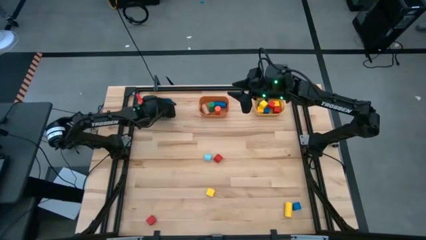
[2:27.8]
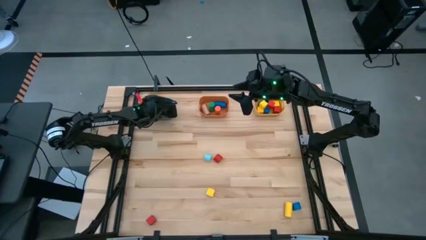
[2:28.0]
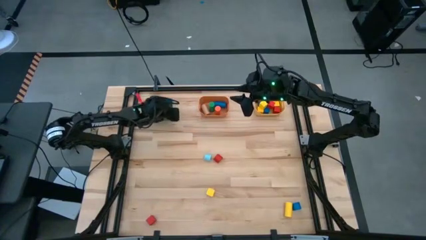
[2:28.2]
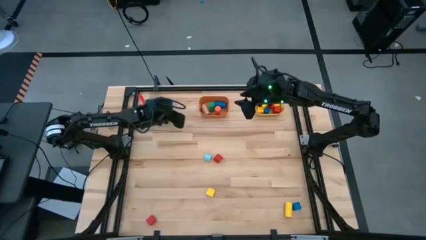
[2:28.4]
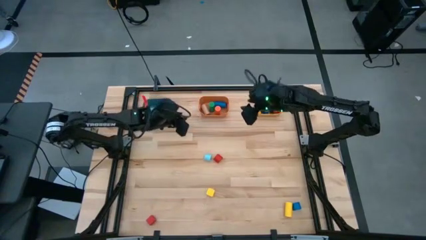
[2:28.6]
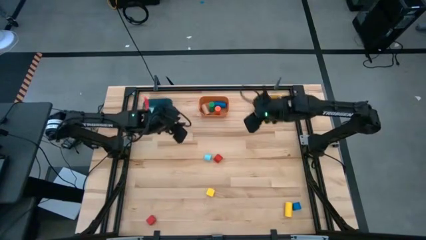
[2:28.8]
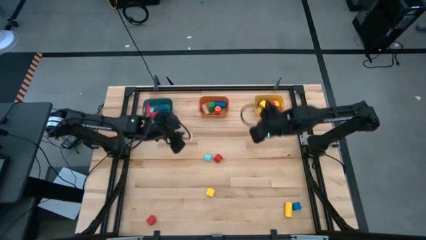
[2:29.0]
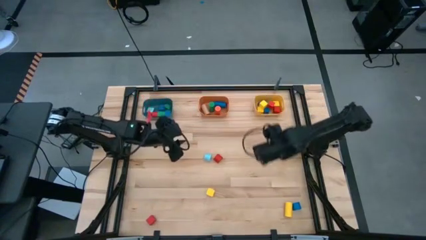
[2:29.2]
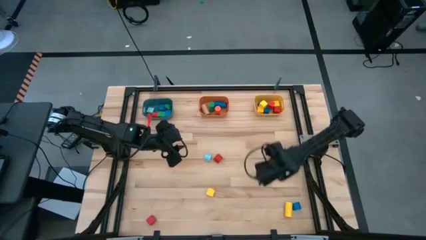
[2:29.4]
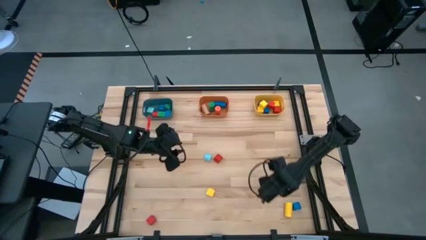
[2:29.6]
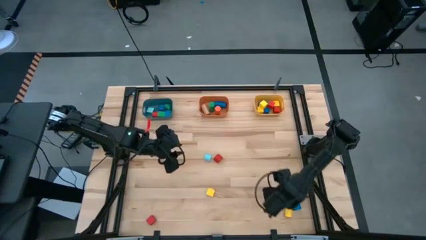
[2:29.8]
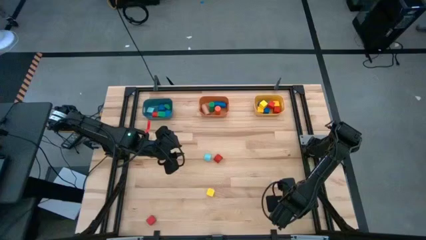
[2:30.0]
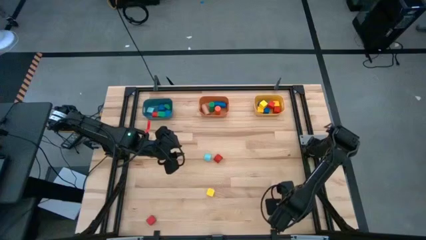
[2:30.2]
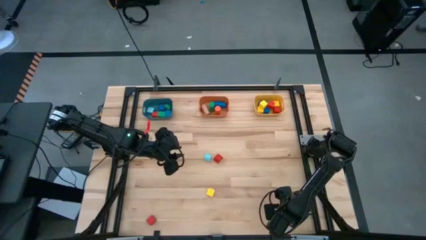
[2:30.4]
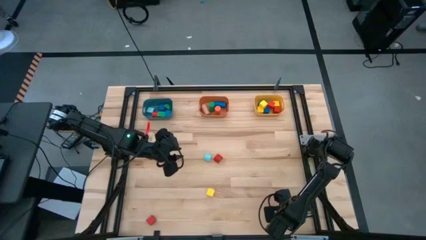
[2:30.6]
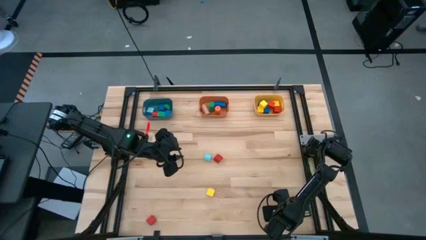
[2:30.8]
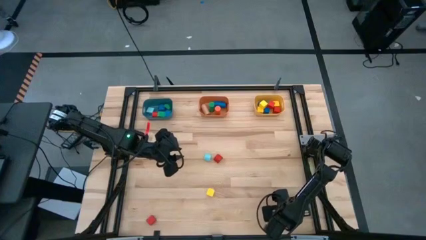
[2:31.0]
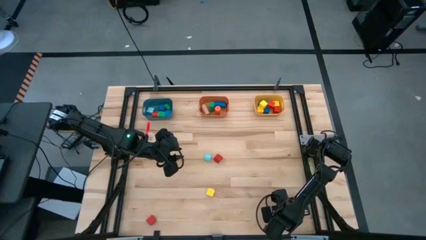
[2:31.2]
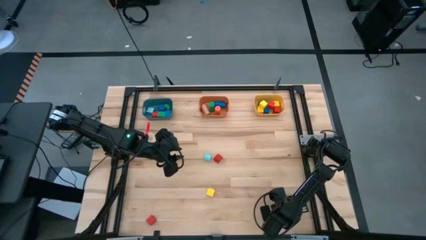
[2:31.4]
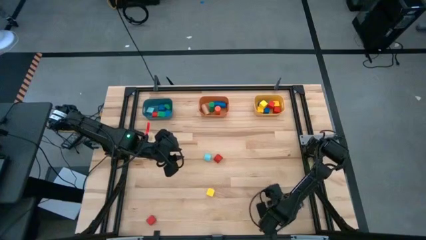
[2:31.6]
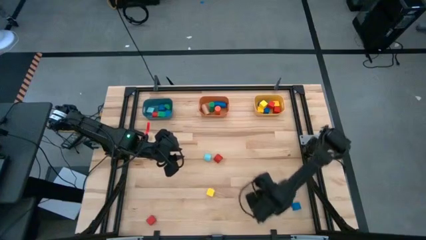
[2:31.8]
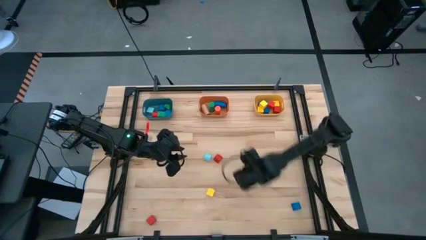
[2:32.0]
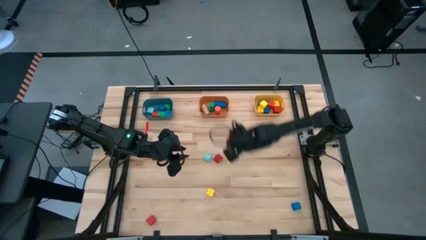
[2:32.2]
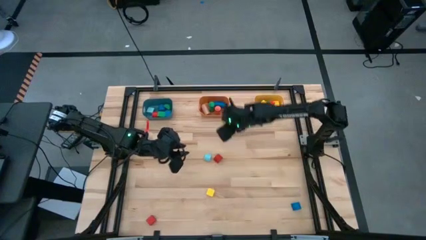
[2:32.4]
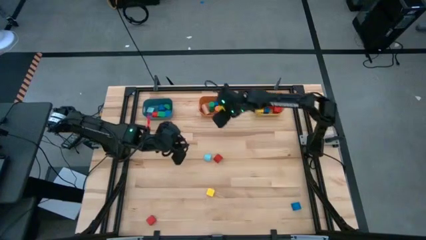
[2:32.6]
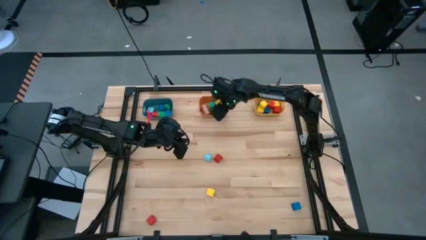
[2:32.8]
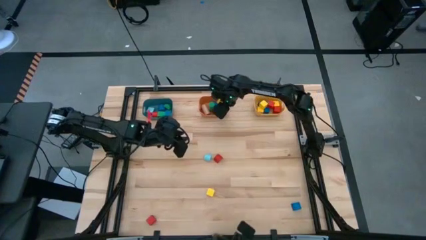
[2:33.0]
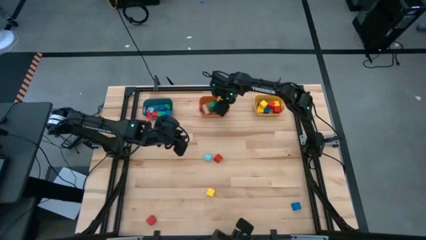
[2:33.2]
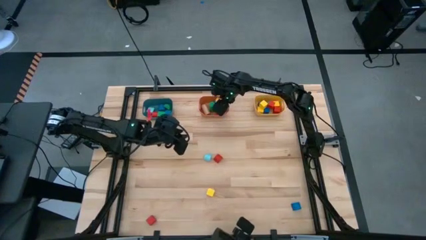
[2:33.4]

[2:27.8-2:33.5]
Task: Sort blocks by size
Put the yellow cylindrical block into the orange bin

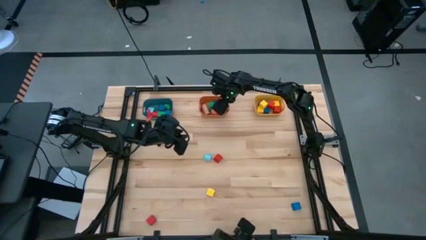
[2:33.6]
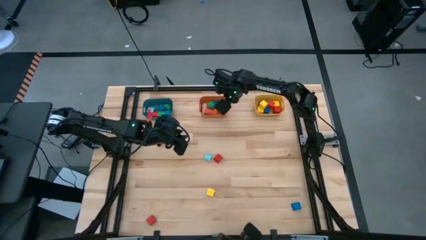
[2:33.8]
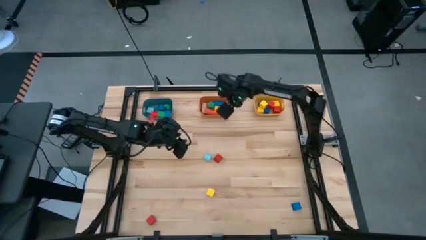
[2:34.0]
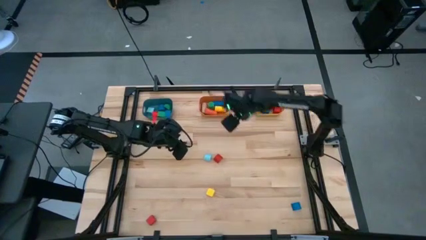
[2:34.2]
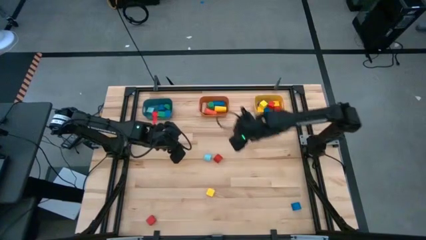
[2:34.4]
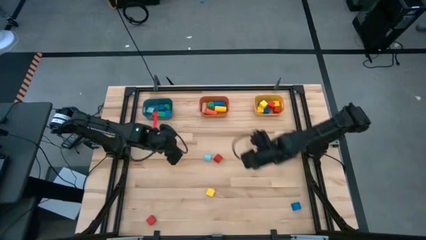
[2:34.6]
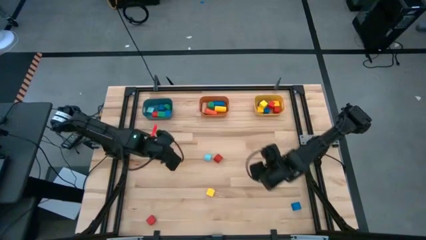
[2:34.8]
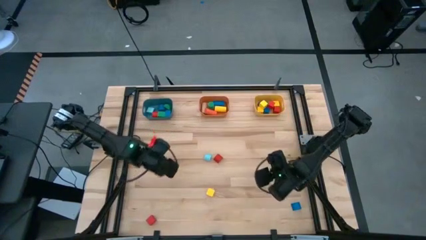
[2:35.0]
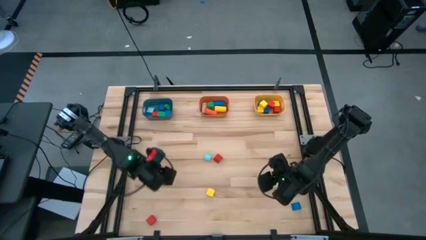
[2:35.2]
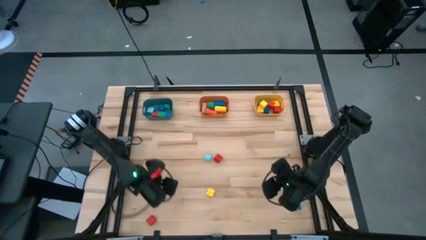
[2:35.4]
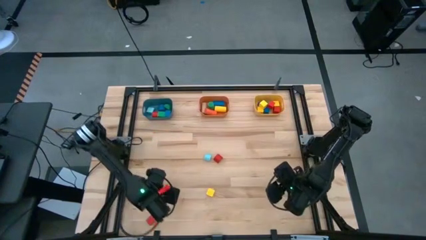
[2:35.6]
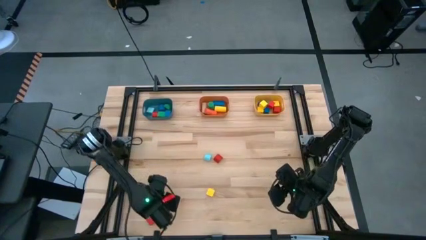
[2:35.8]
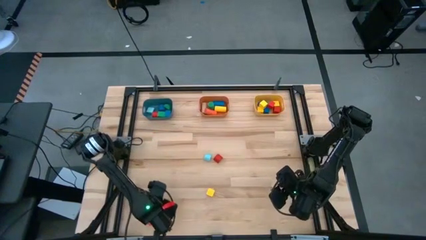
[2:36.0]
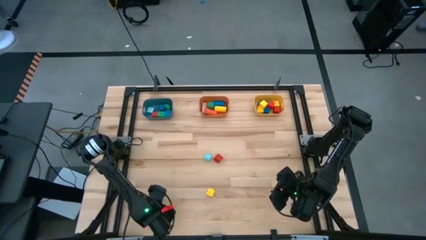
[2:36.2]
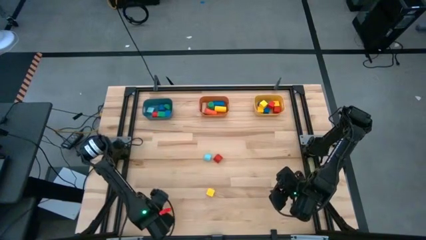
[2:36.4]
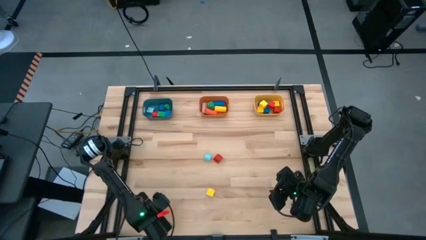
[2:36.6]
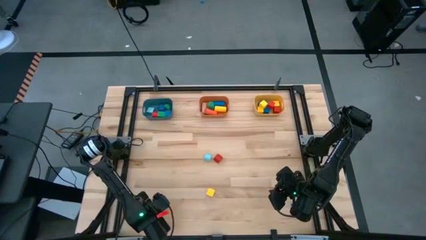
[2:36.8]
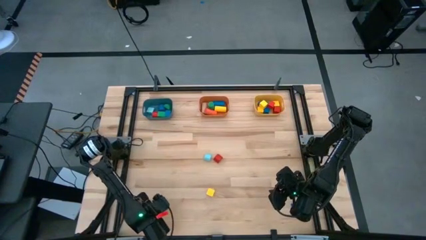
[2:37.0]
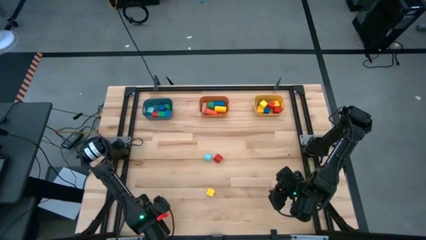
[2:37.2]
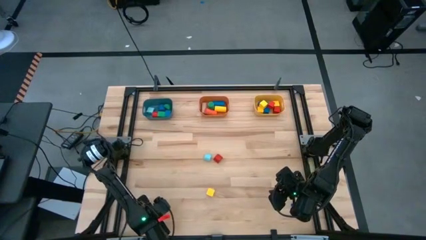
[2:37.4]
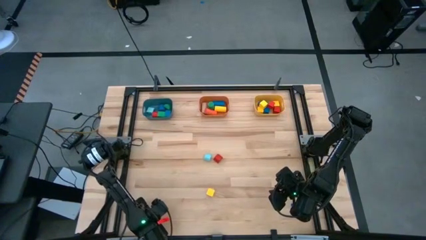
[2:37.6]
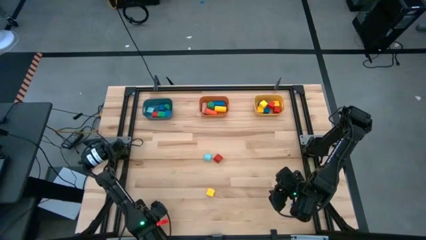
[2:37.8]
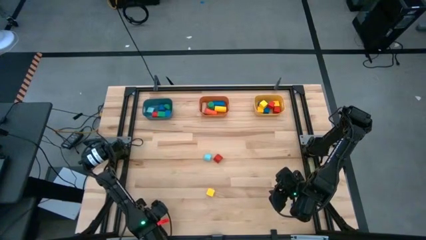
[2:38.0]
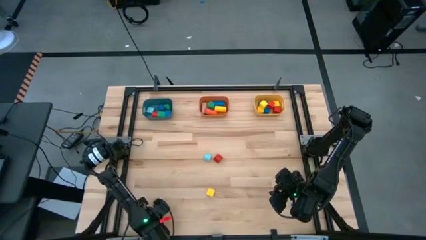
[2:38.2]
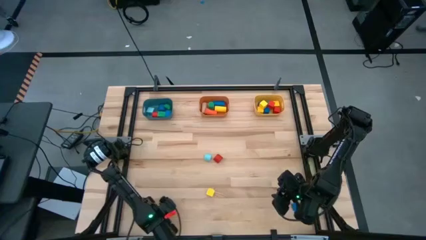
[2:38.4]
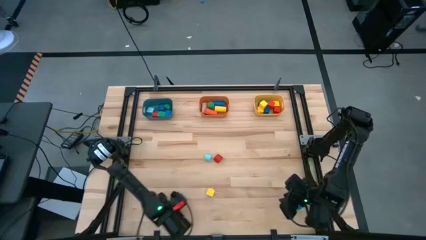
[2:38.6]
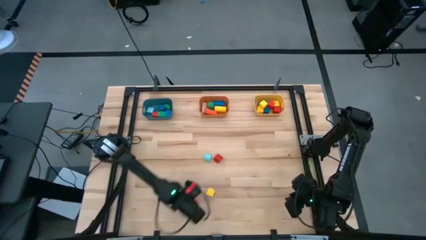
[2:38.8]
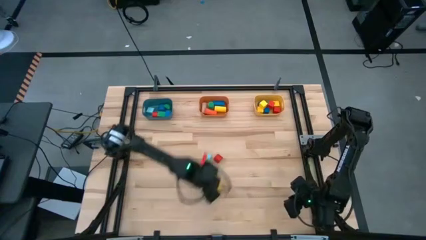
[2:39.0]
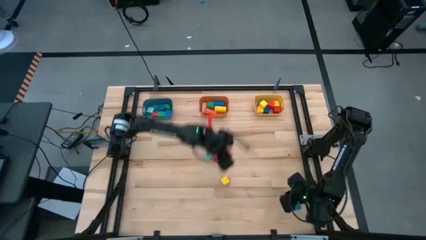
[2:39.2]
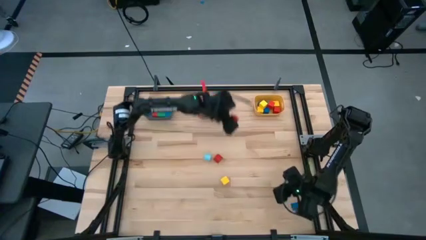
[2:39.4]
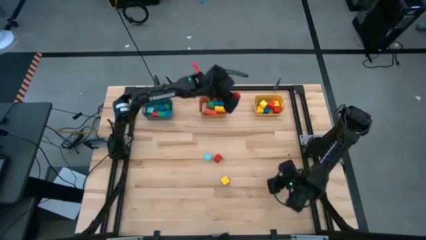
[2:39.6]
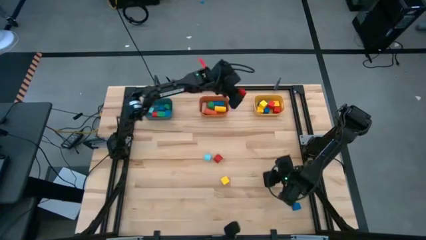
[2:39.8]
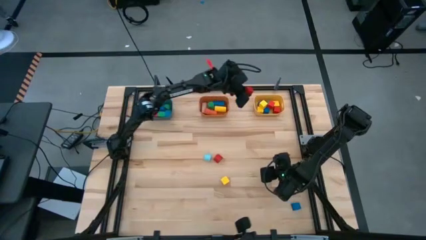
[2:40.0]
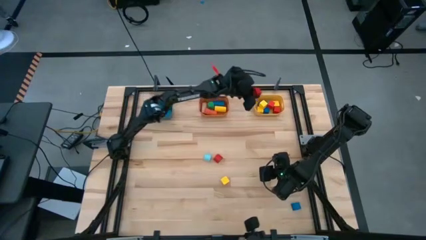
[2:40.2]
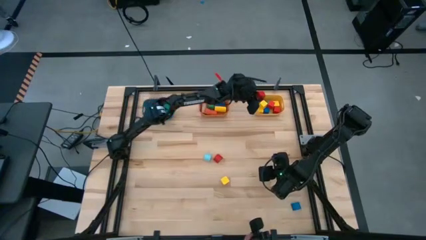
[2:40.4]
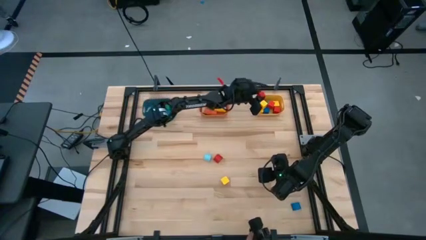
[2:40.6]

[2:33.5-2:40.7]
Put the red cube block into the yellow bin

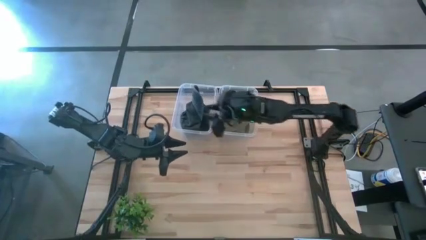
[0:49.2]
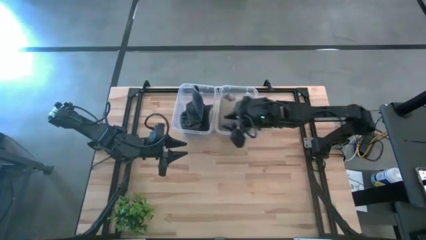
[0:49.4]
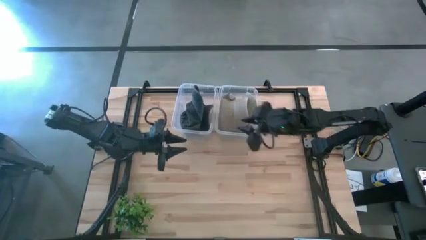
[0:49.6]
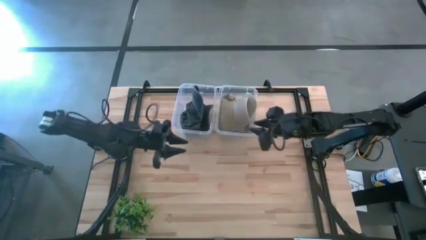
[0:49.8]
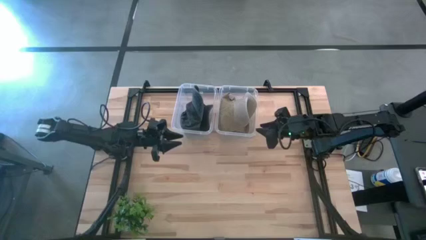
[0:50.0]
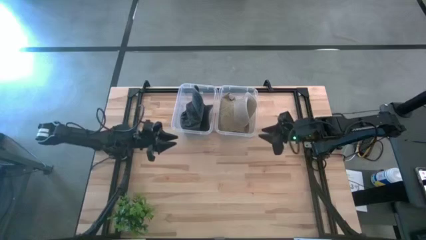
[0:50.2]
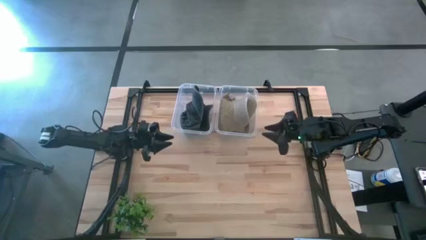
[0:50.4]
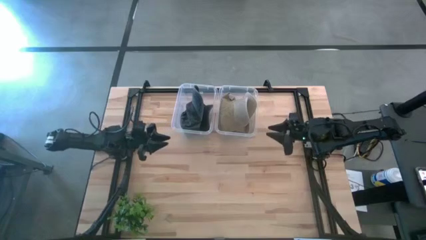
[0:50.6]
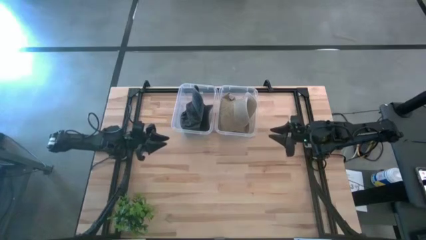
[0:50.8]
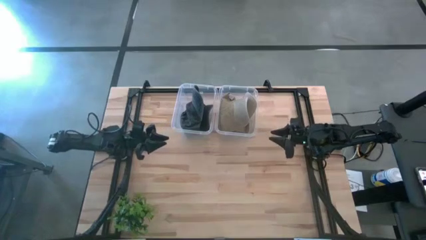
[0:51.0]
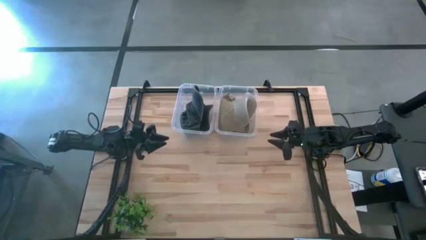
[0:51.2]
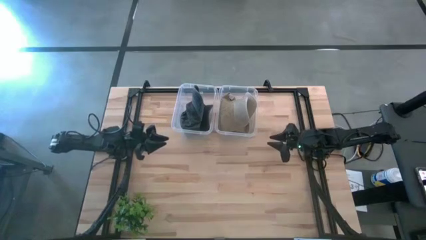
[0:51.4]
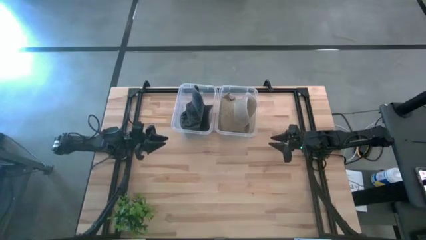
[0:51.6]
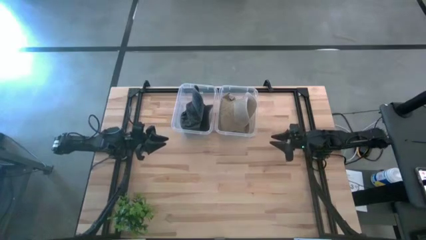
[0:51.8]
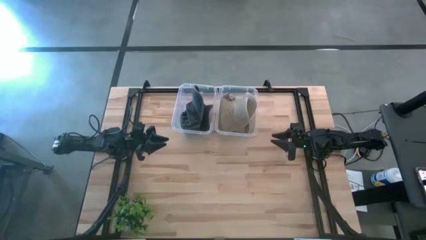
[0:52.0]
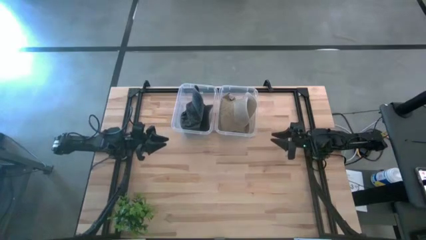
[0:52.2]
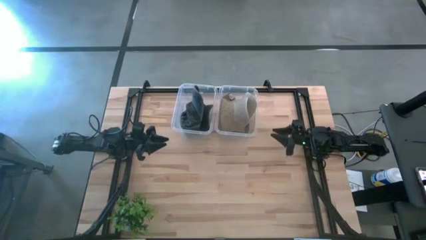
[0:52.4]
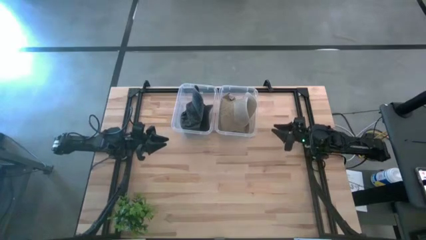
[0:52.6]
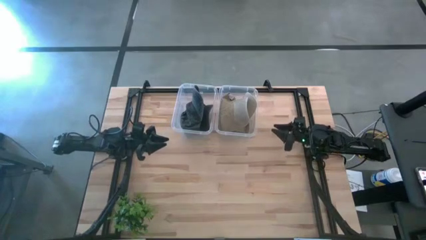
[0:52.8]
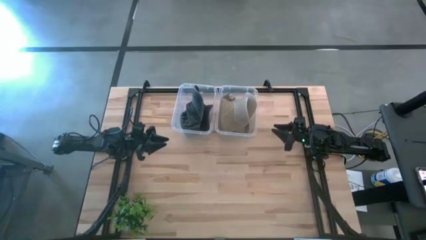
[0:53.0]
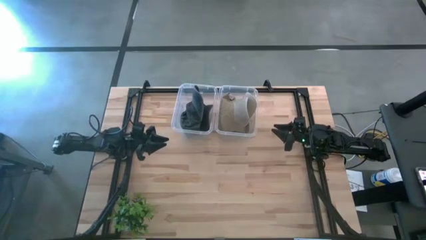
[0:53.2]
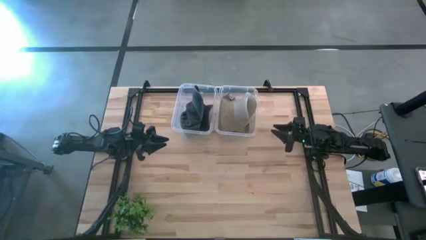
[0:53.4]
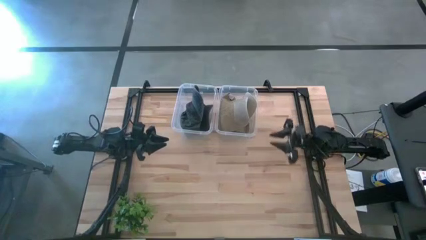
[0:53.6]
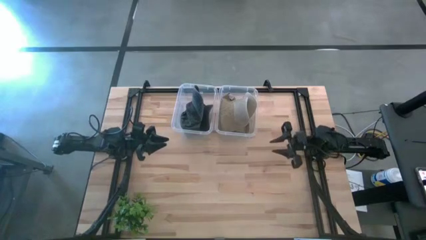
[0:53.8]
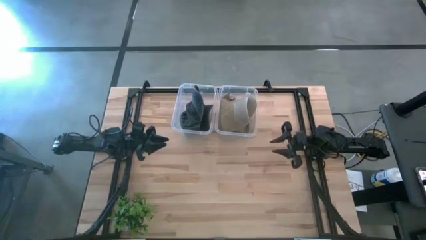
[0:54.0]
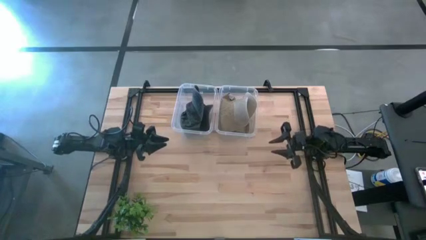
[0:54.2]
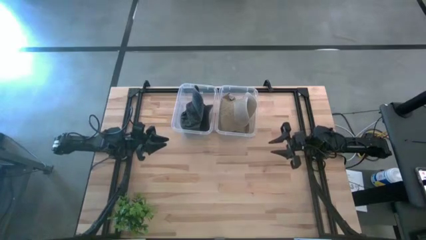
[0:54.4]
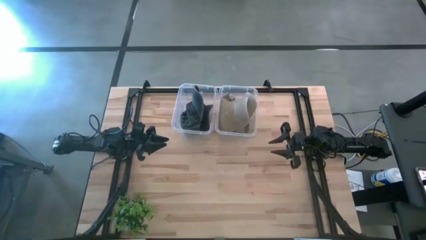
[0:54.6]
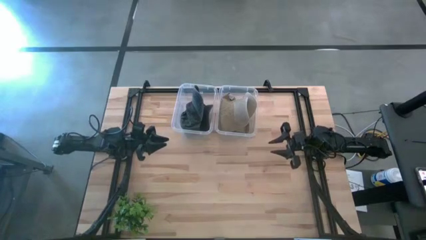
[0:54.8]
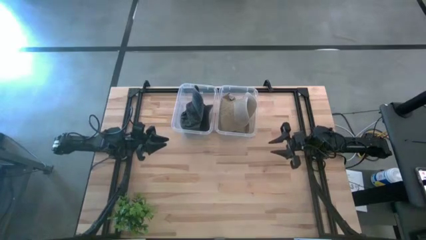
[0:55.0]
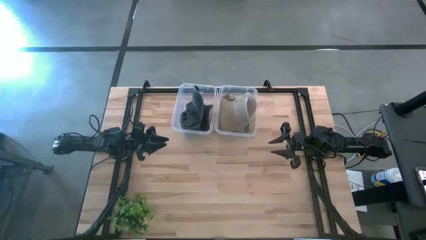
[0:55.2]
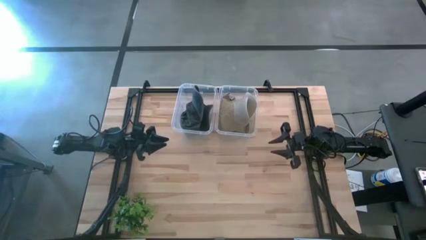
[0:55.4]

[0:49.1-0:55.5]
Task: Pick & Place hat
Return to Home Position
